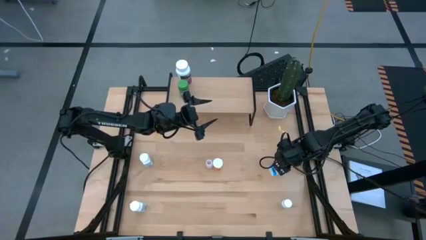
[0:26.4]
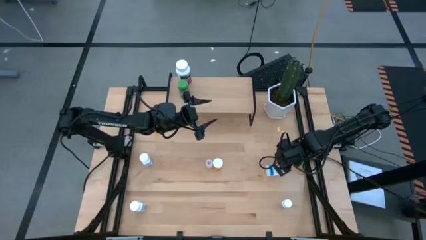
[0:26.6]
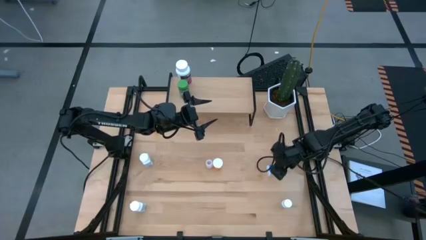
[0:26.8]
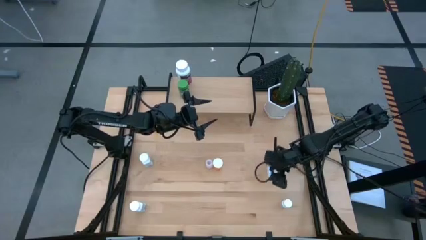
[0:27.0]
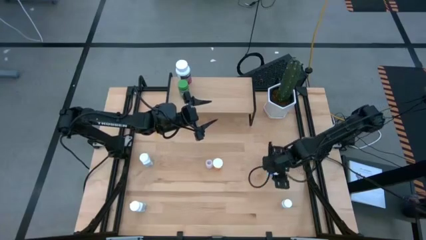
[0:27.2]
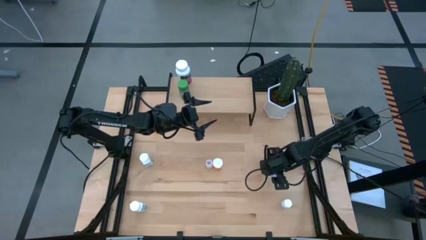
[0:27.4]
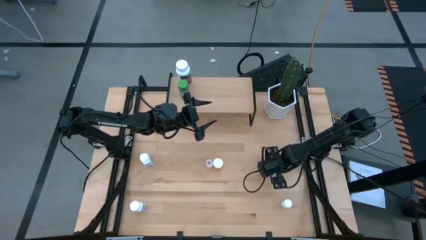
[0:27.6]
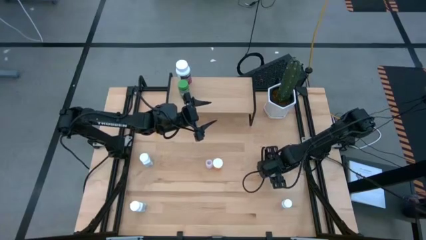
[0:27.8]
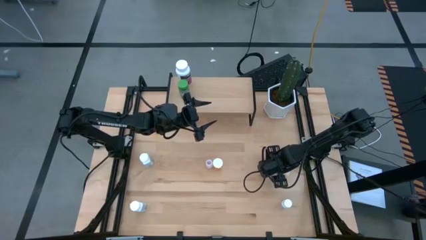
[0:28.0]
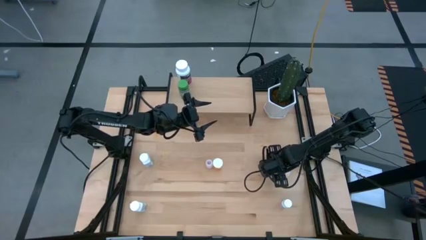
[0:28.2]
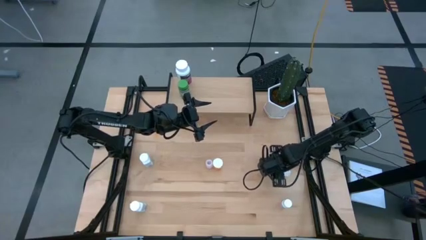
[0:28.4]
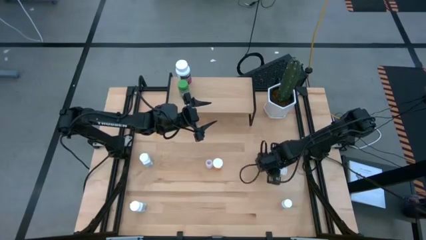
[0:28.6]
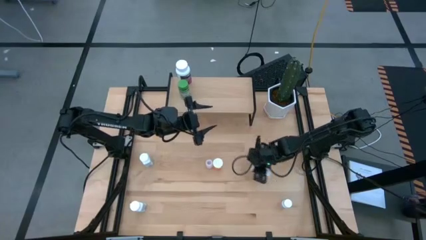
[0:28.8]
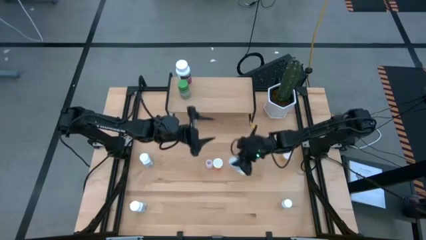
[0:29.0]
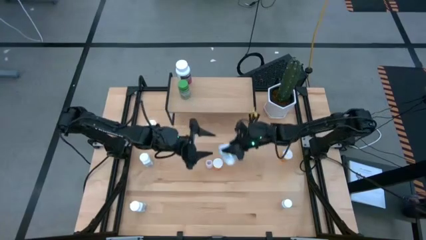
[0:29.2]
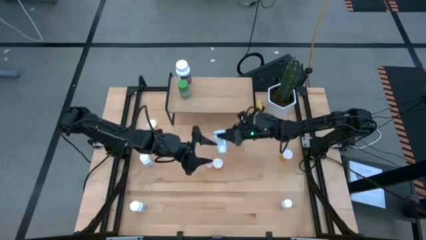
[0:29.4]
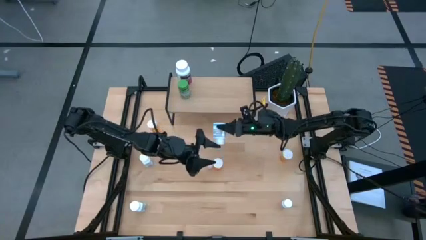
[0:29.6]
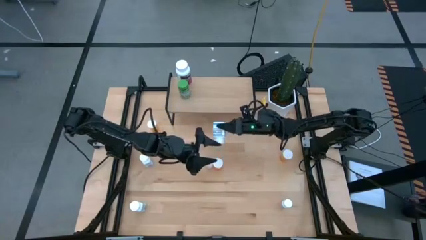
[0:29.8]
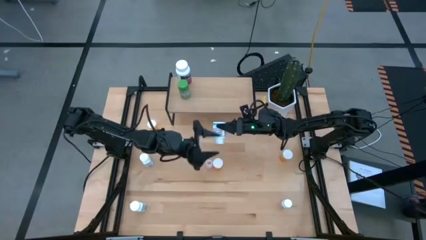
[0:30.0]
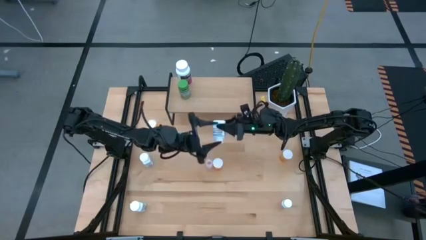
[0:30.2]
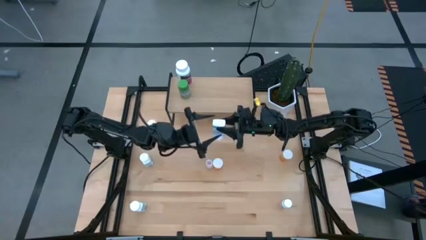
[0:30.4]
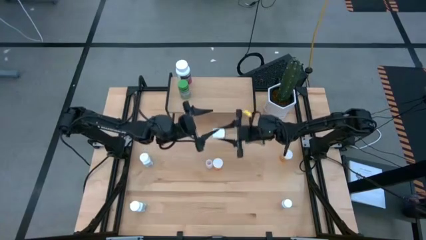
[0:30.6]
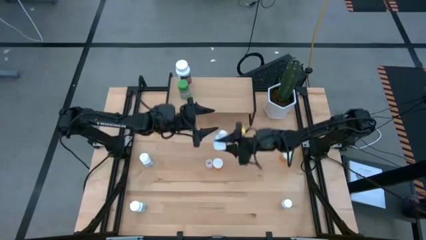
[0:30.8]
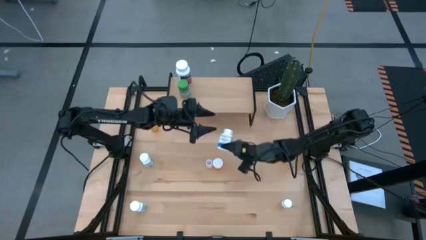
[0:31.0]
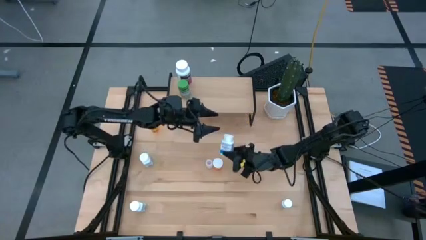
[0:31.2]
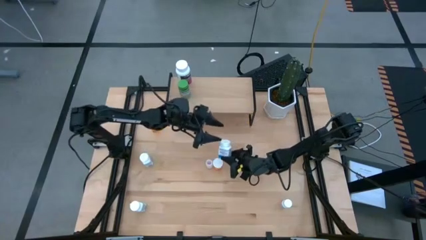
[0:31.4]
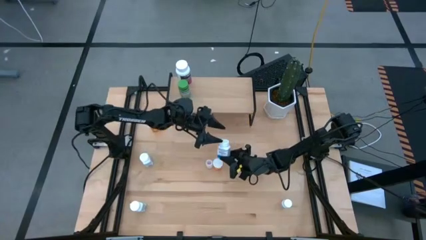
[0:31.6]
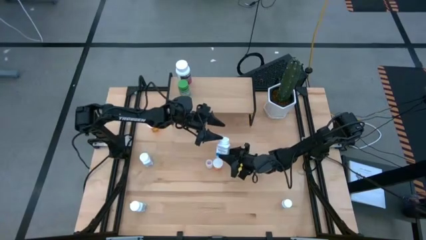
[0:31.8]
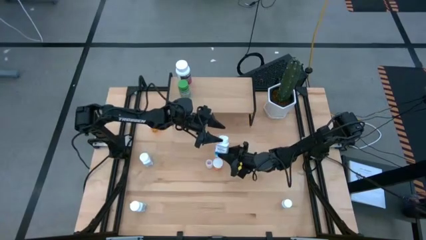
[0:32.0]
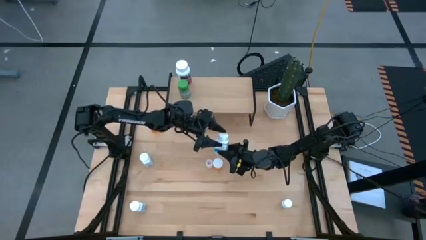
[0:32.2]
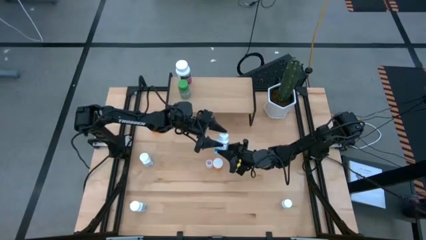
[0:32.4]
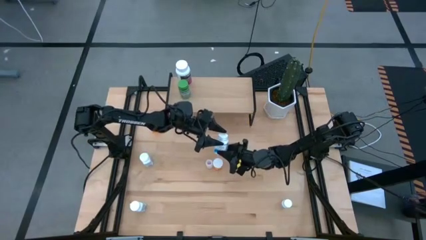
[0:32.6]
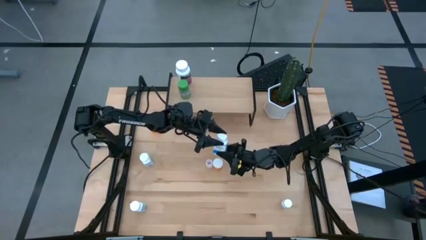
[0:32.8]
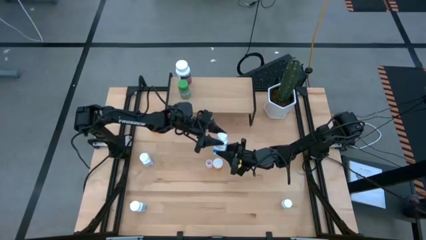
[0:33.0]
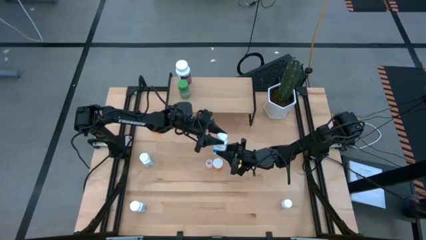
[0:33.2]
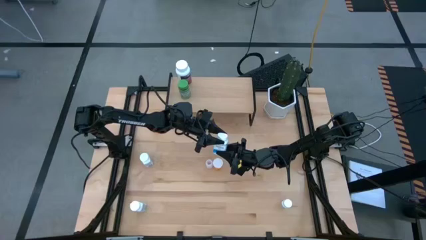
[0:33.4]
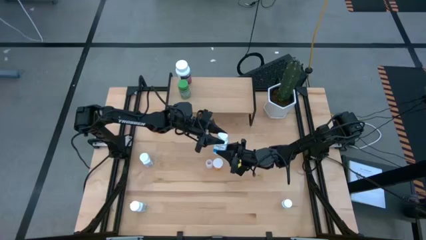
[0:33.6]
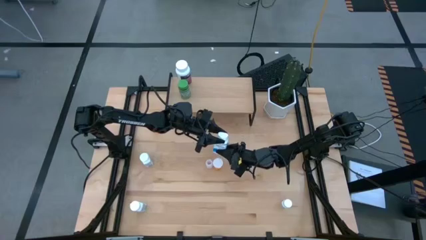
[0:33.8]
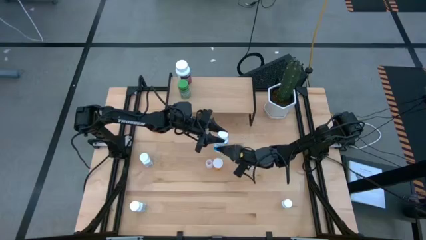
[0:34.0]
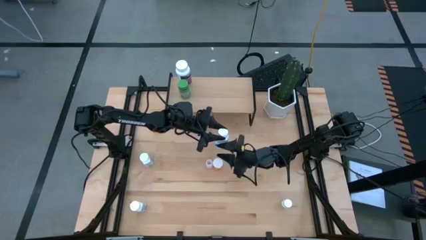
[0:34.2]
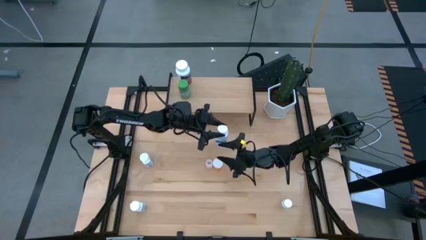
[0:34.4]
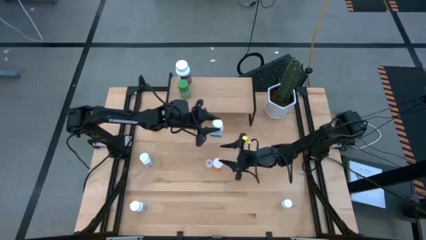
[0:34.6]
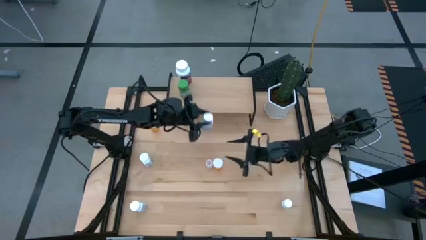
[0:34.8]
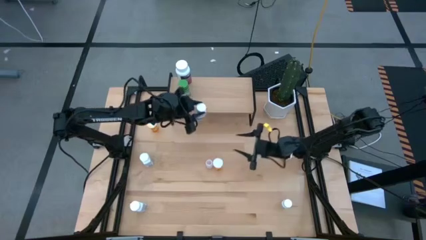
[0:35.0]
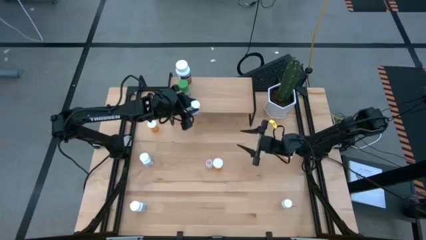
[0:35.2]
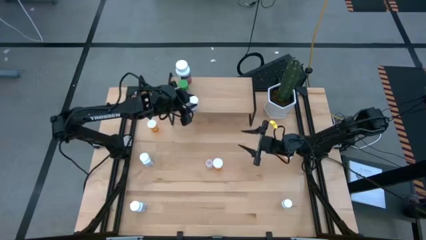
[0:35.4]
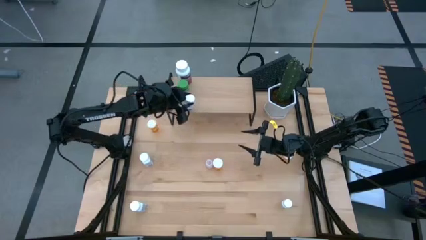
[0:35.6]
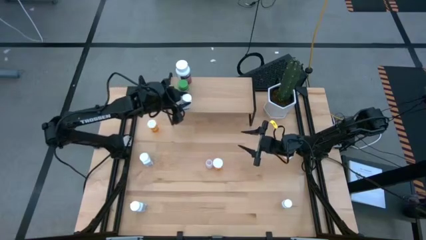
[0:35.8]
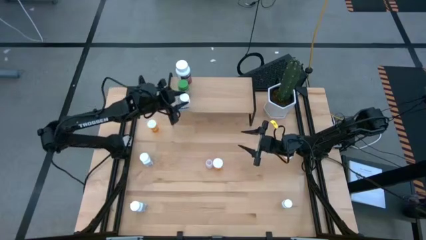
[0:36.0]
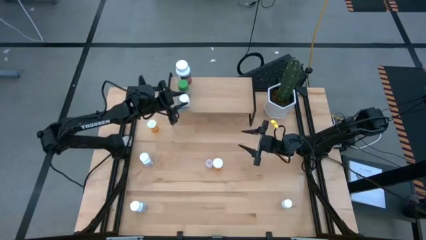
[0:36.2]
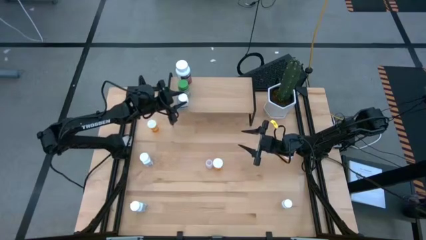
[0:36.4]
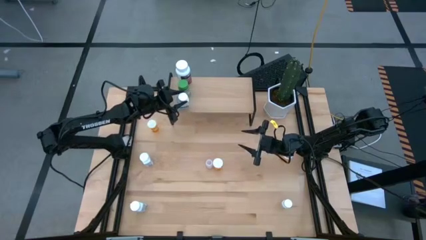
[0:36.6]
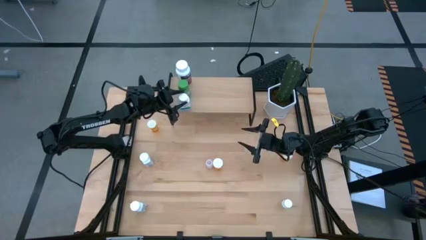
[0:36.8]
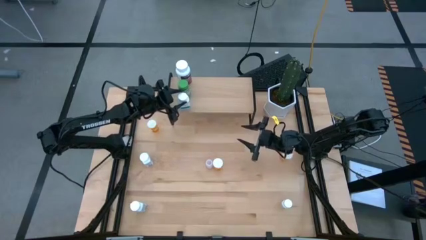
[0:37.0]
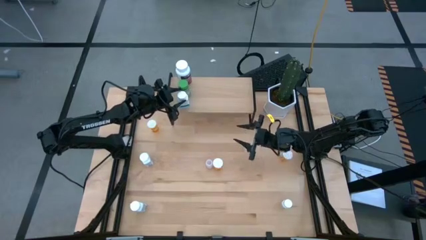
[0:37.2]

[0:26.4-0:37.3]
Task: Pick and place medicine bottles onto shelf by color
Put the white blue pill bottle on the shelf
